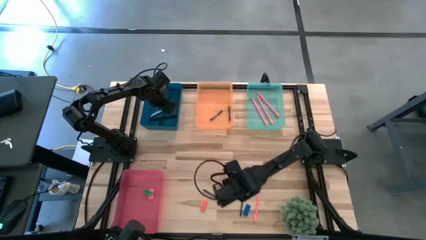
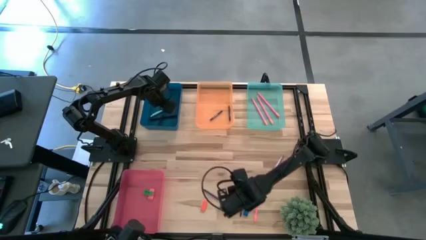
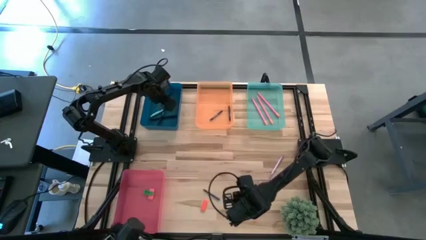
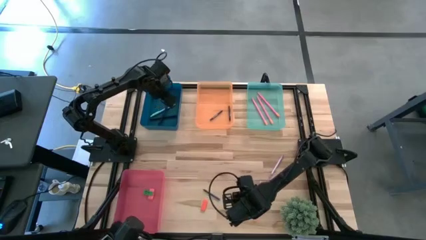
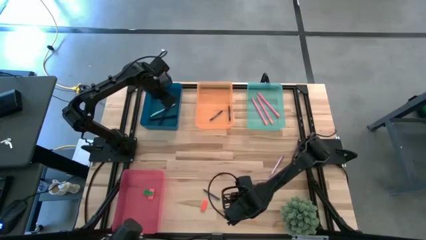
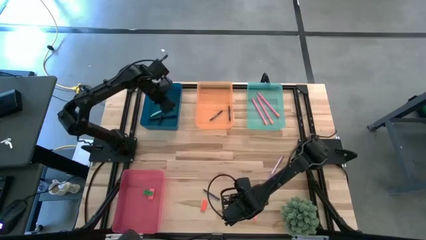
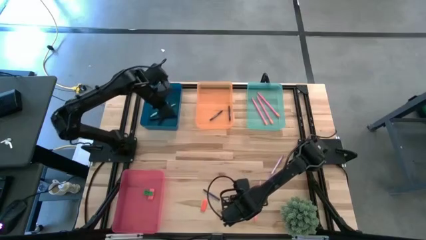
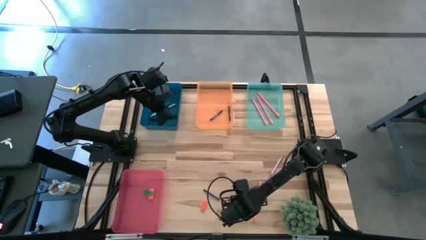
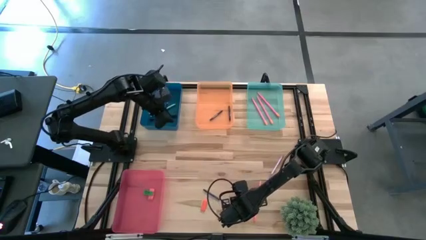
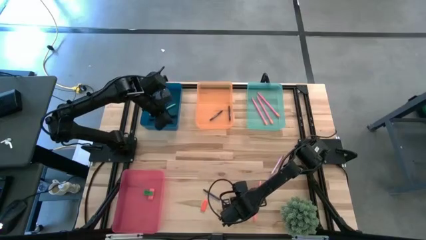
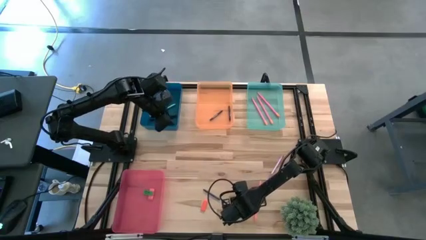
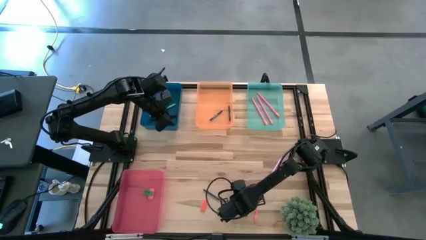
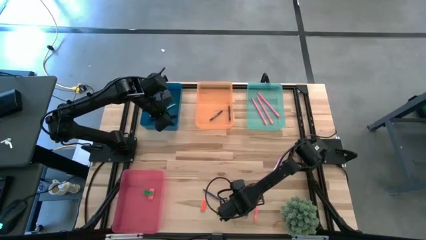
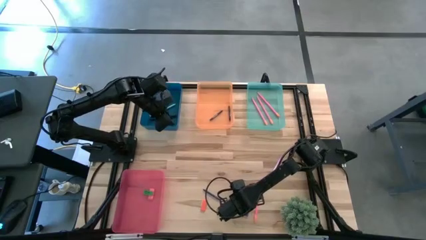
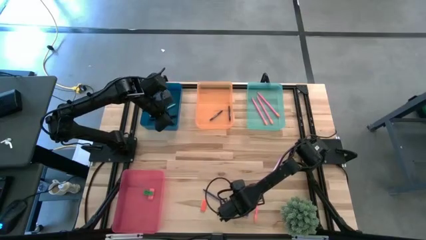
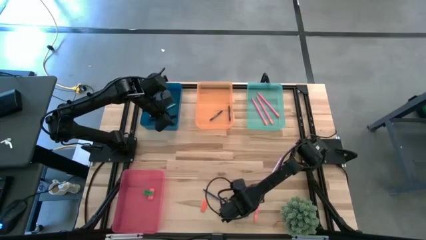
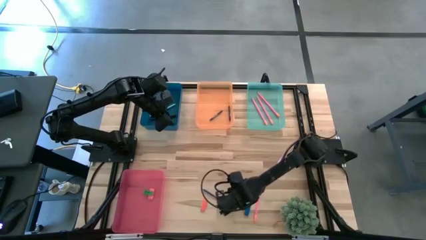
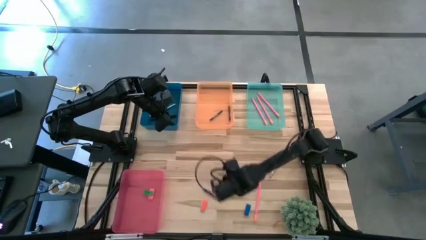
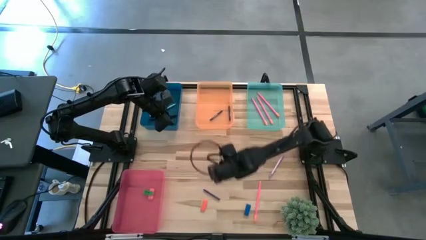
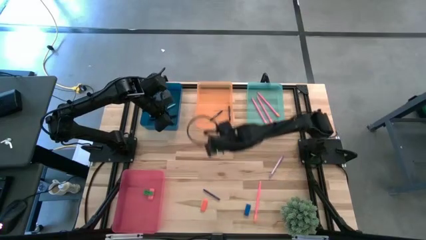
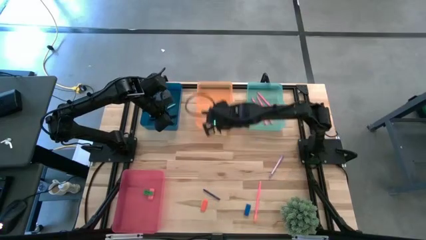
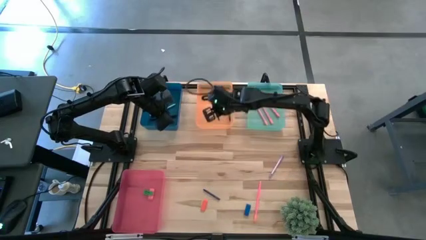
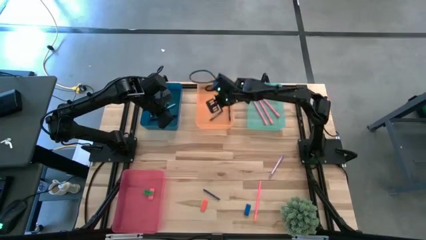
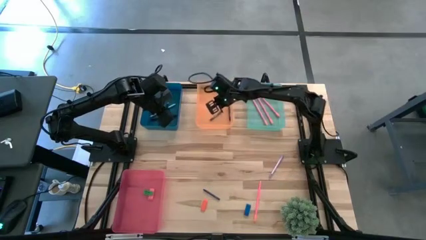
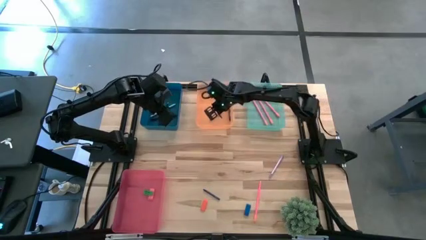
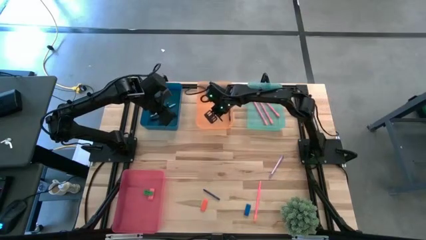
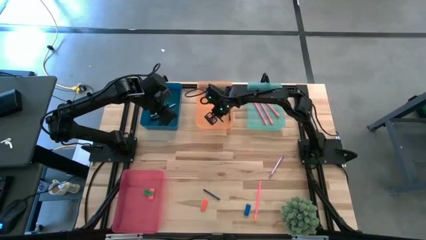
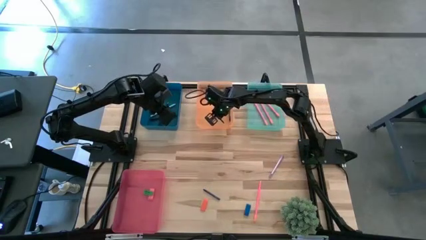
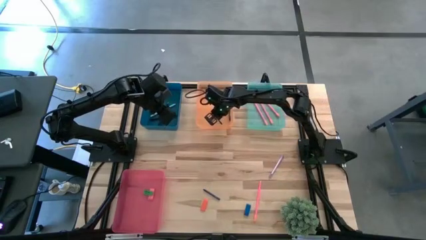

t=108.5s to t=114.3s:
Task: Sort crayons/erasers/pens/pencils in bins
Put the blue crayon into the orange bin

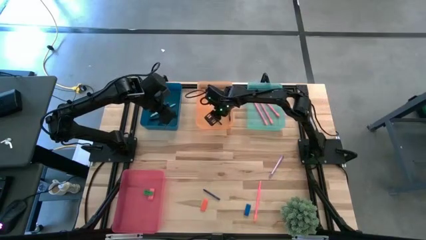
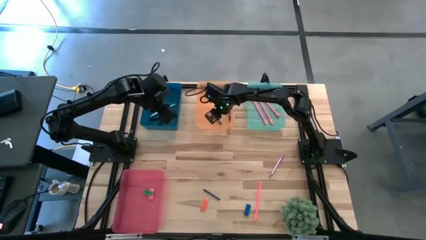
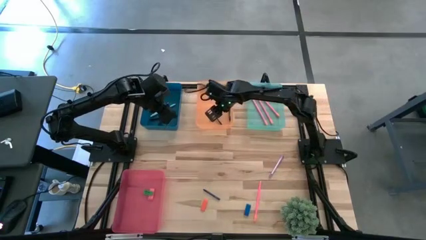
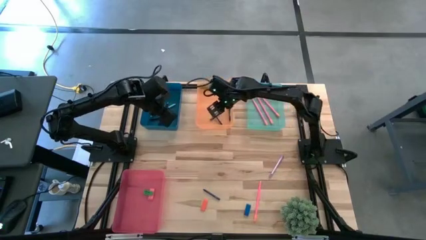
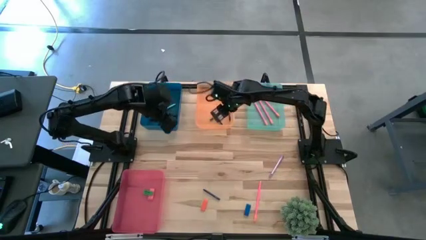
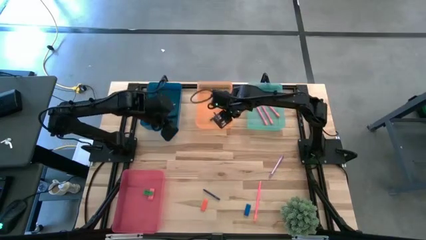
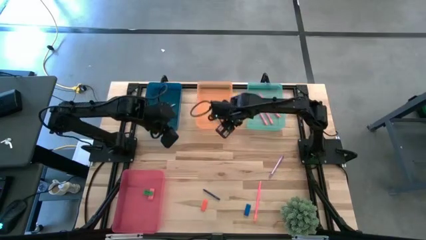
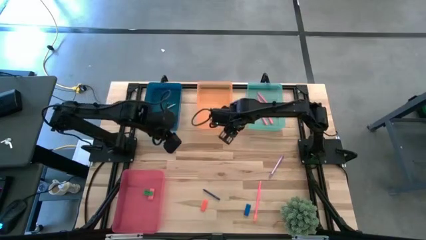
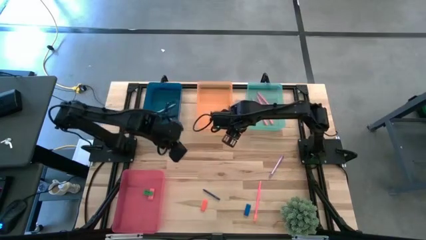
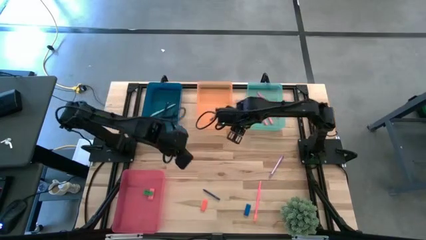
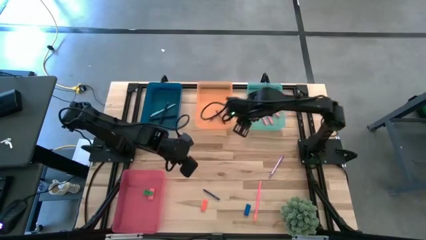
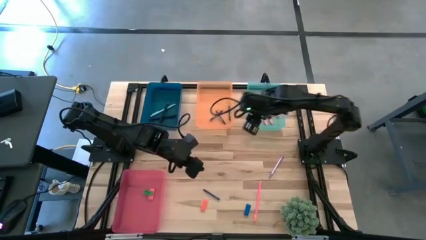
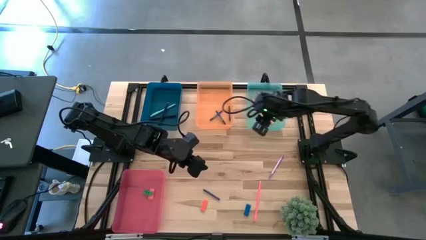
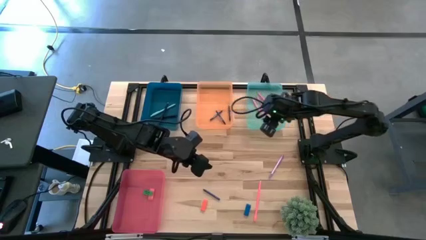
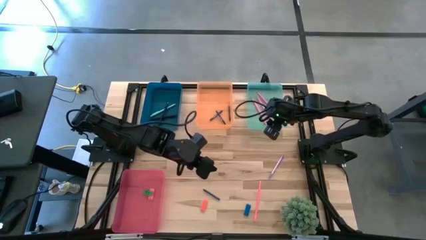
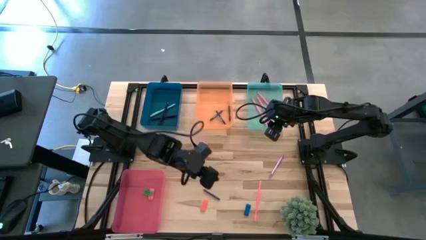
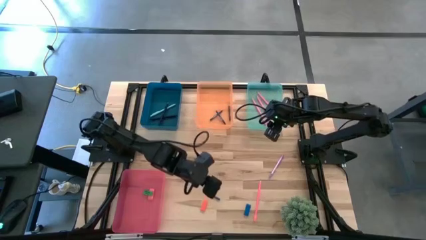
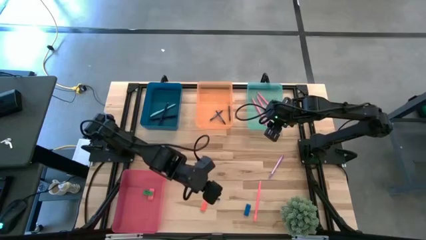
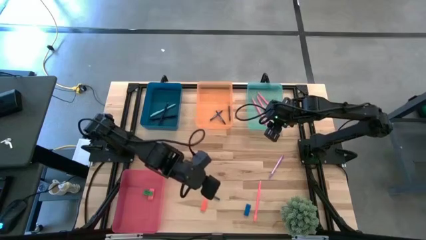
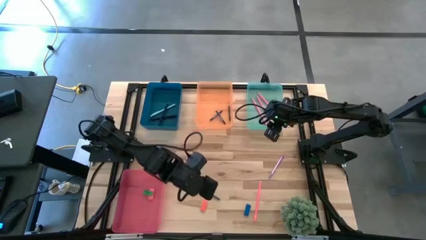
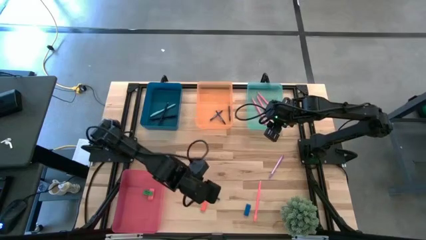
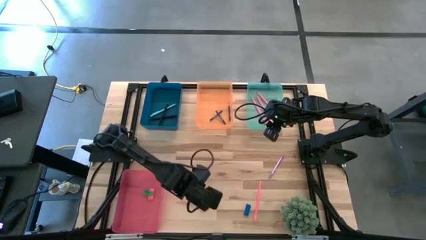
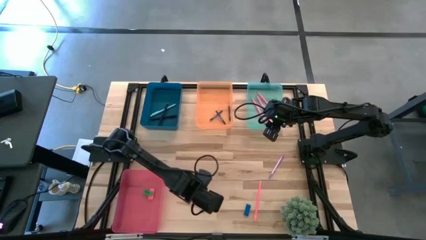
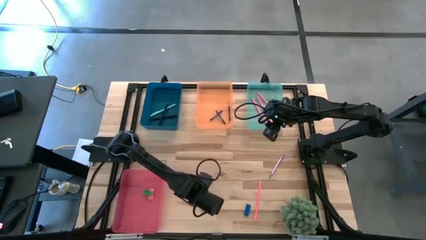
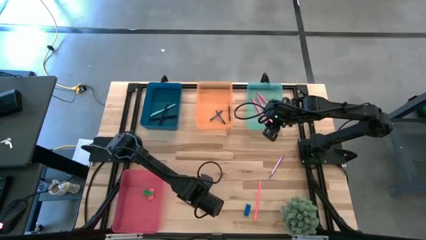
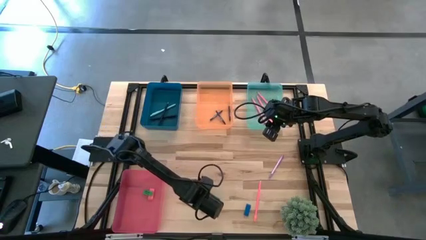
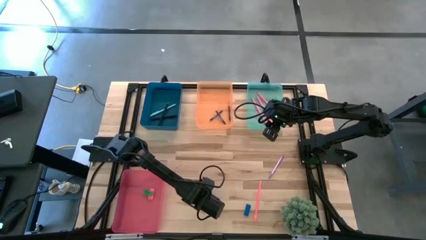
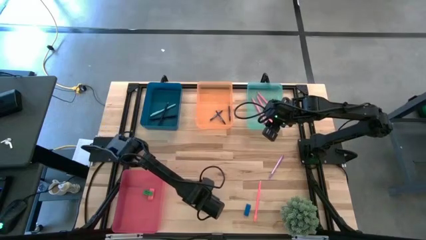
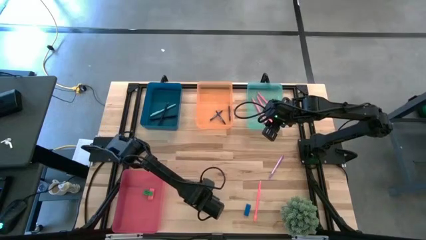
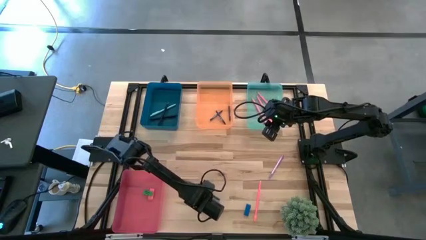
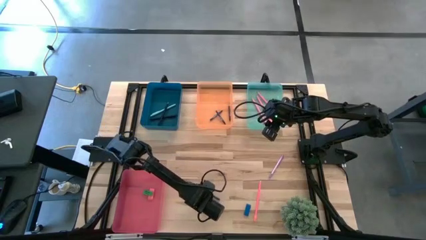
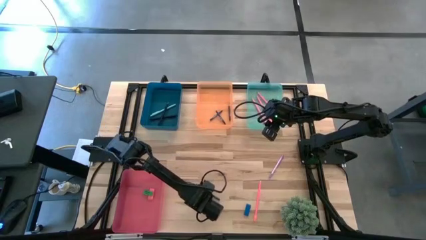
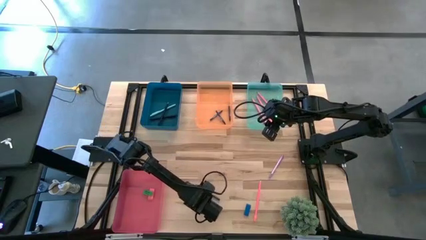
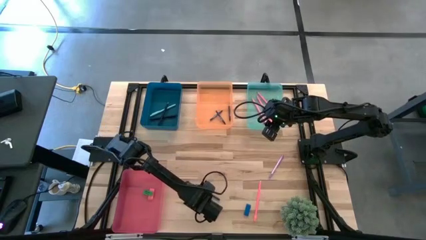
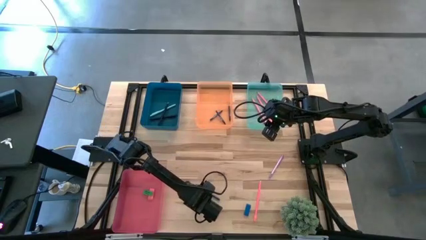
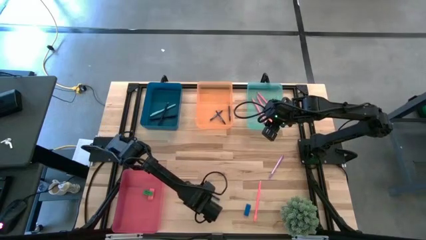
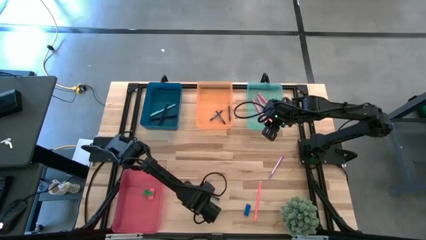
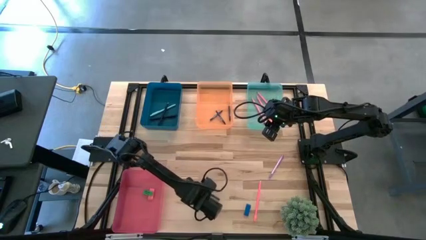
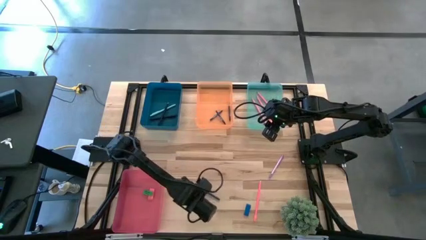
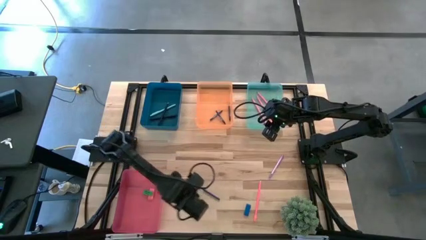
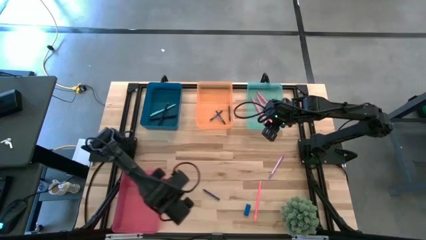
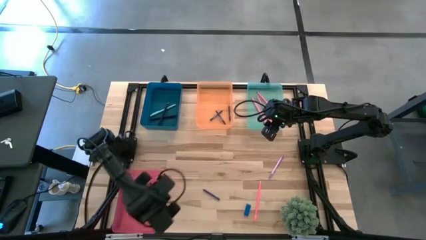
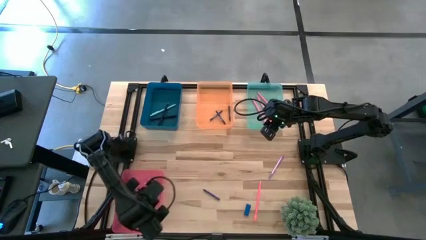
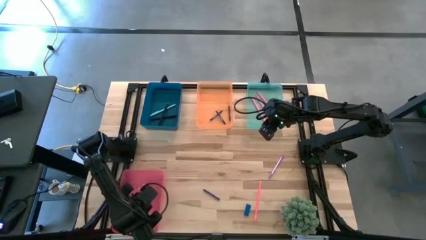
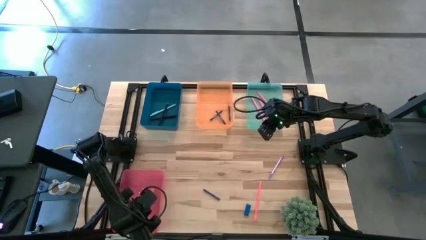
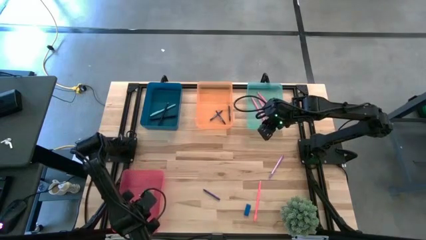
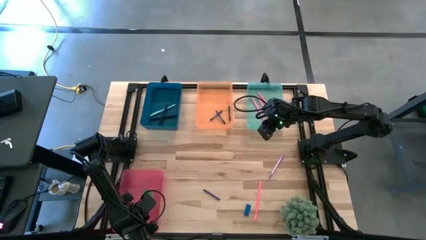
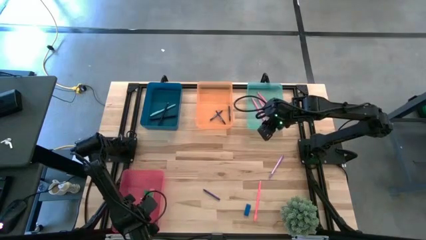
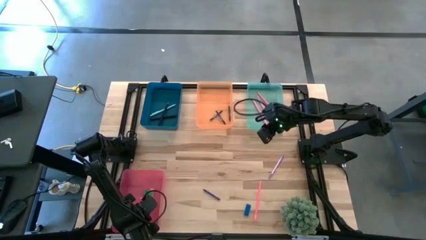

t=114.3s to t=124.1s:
Put the orange eraser into the pink bin
